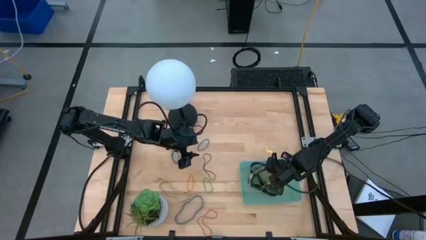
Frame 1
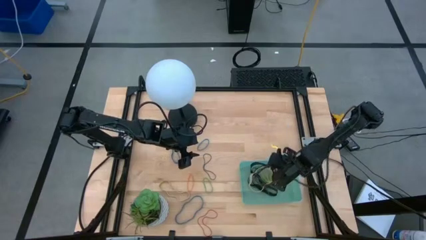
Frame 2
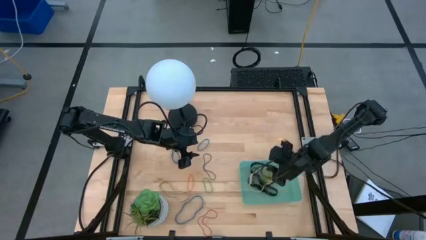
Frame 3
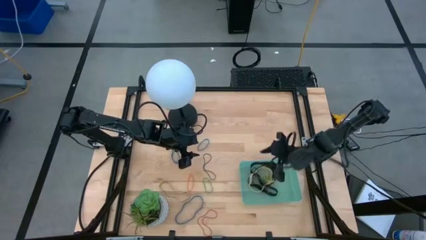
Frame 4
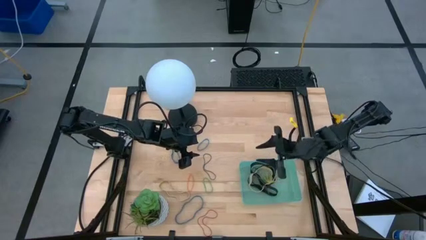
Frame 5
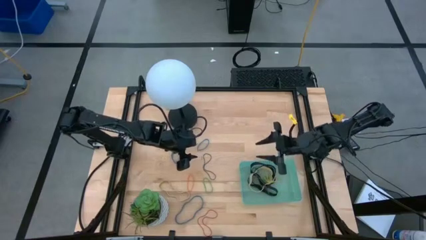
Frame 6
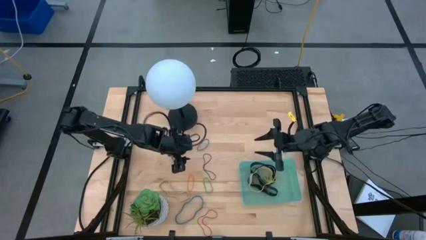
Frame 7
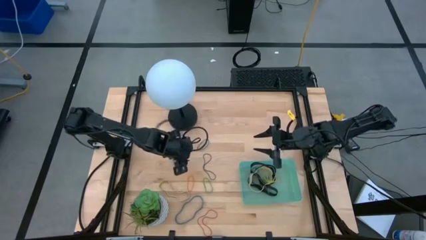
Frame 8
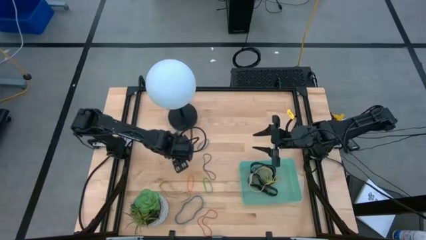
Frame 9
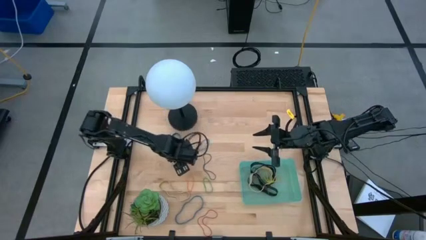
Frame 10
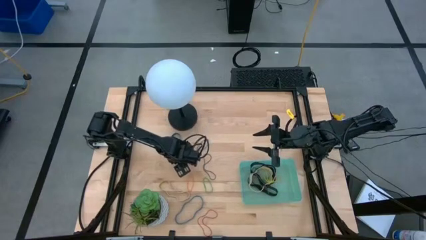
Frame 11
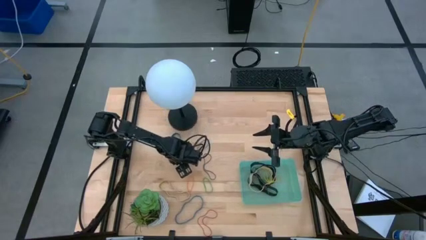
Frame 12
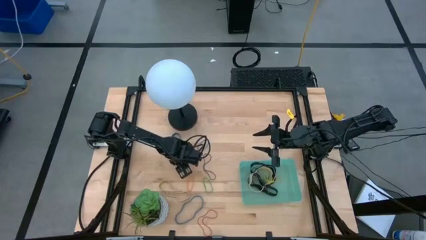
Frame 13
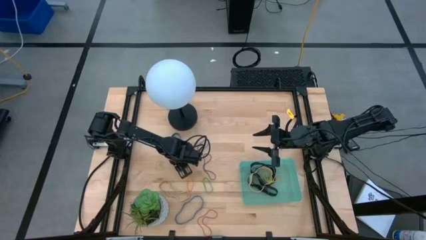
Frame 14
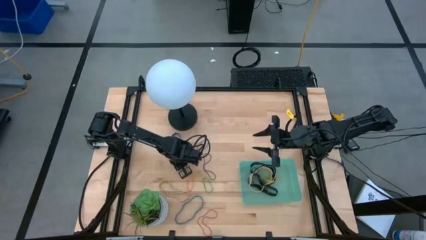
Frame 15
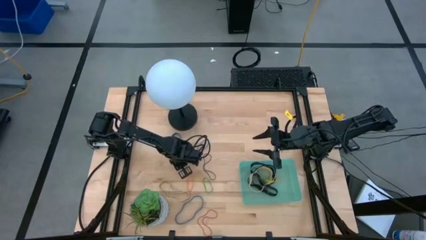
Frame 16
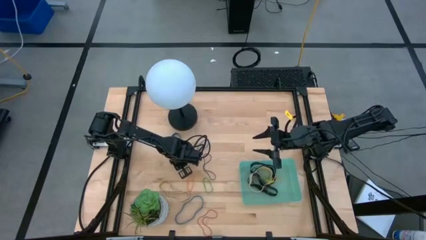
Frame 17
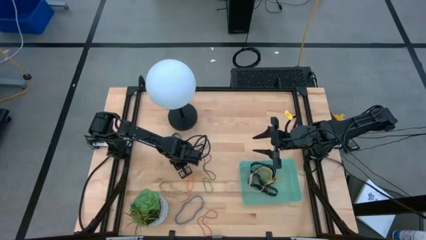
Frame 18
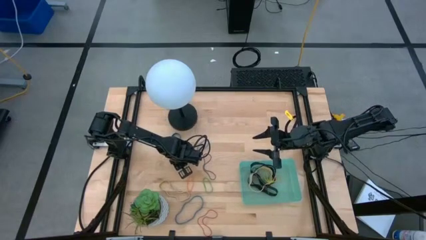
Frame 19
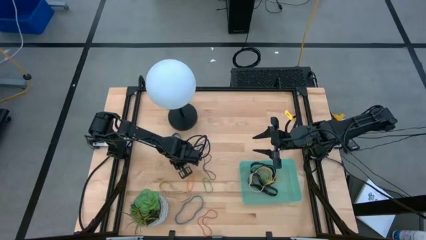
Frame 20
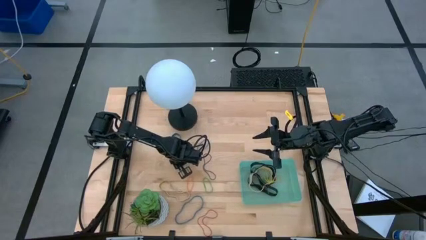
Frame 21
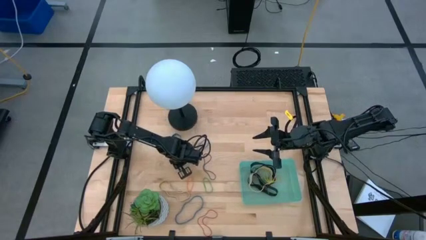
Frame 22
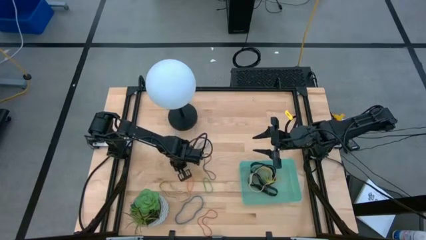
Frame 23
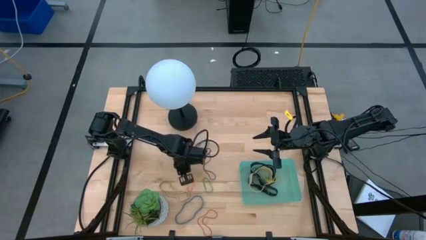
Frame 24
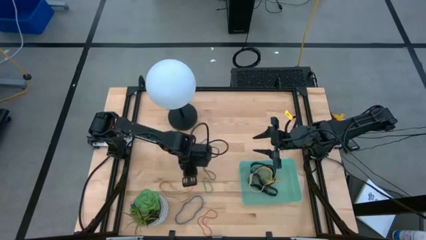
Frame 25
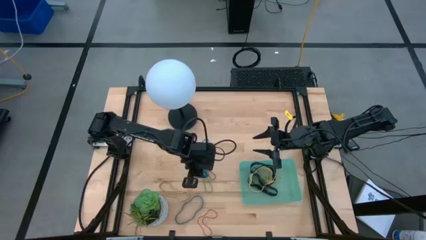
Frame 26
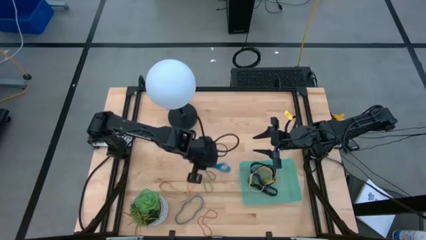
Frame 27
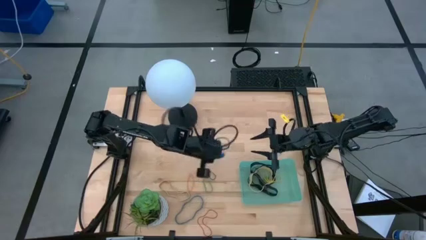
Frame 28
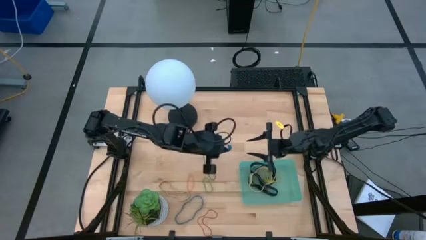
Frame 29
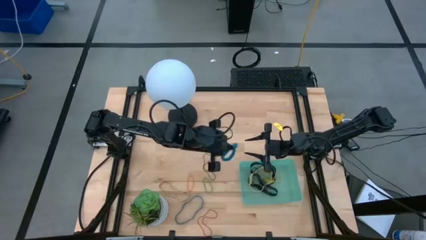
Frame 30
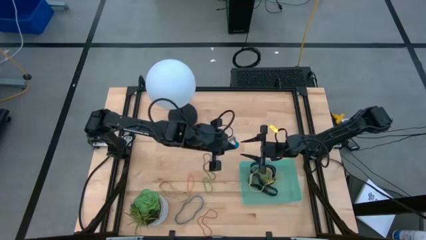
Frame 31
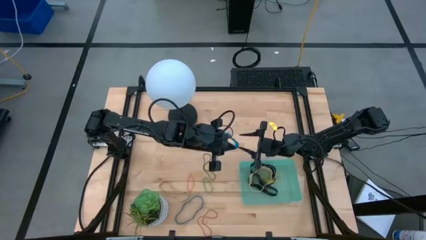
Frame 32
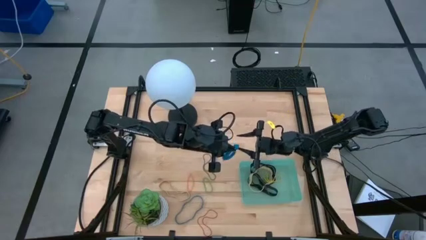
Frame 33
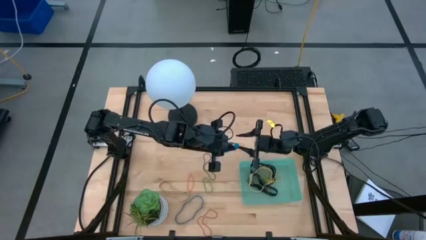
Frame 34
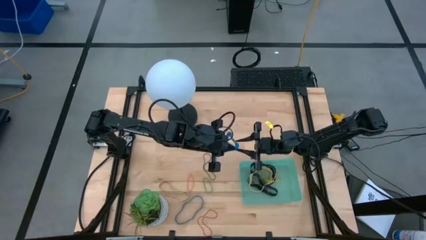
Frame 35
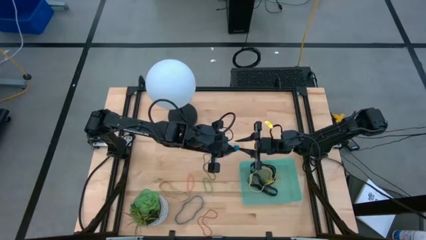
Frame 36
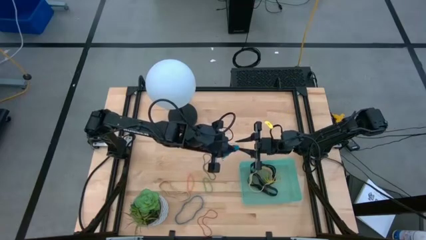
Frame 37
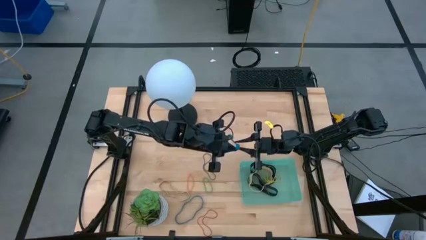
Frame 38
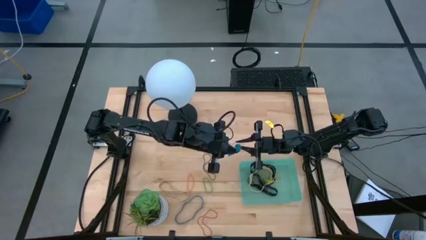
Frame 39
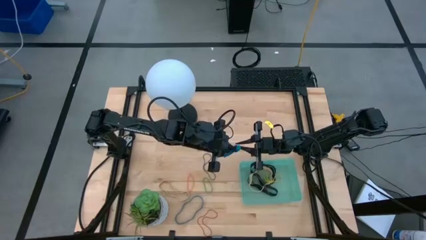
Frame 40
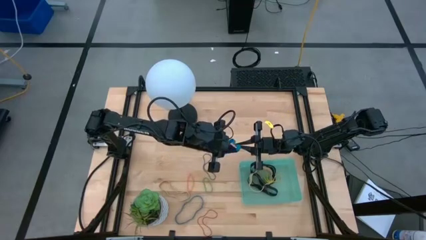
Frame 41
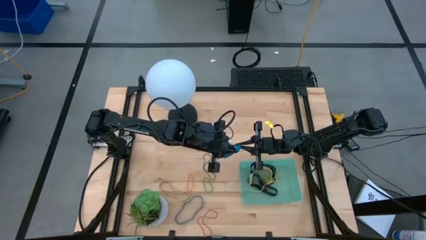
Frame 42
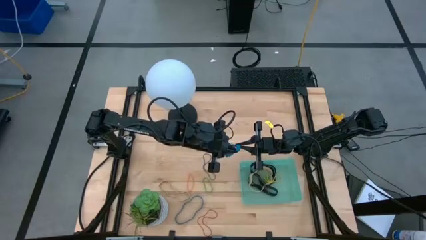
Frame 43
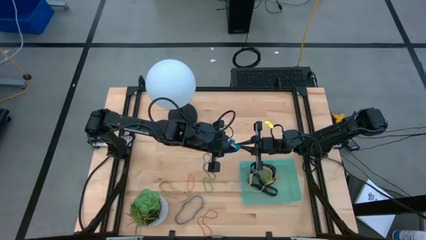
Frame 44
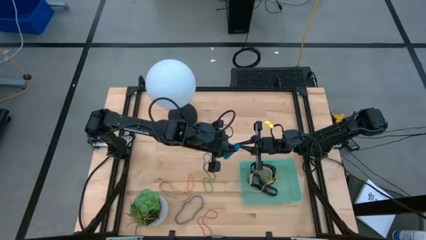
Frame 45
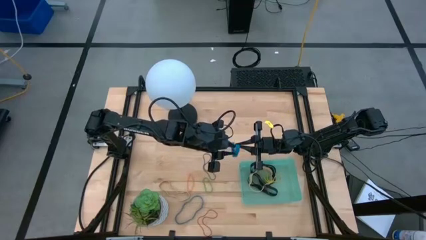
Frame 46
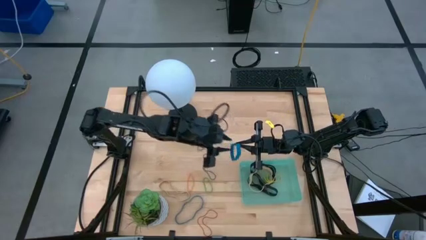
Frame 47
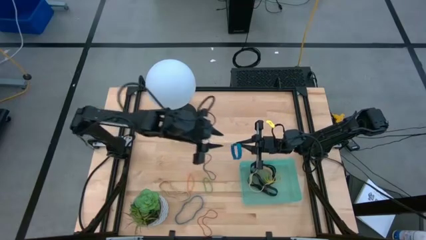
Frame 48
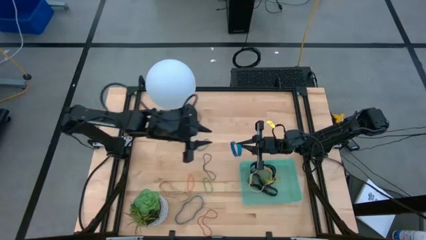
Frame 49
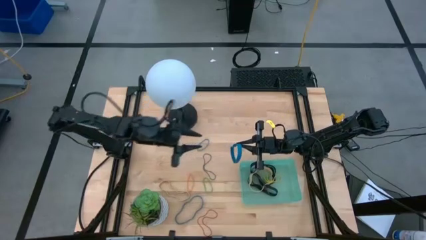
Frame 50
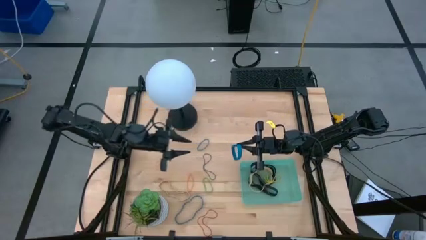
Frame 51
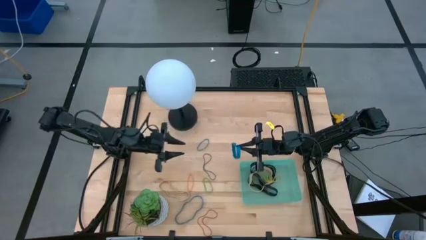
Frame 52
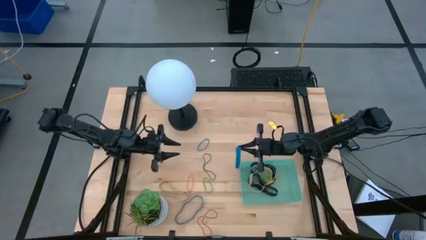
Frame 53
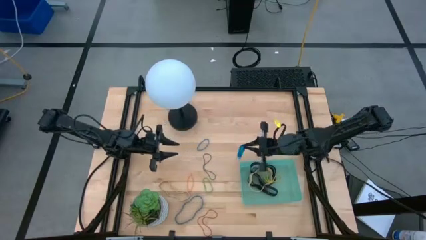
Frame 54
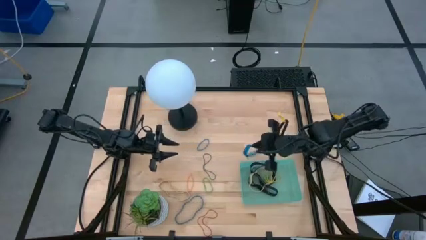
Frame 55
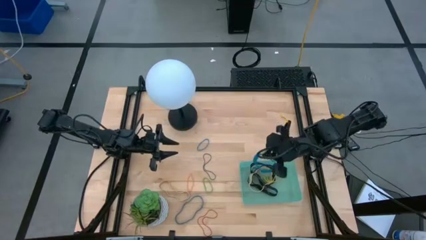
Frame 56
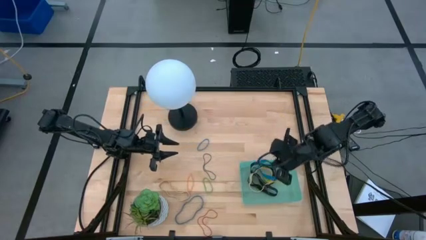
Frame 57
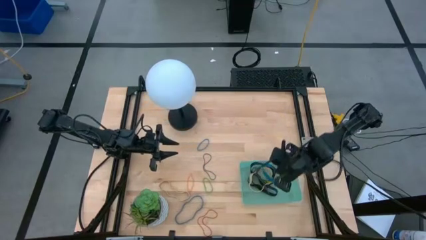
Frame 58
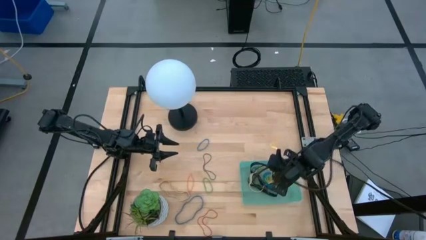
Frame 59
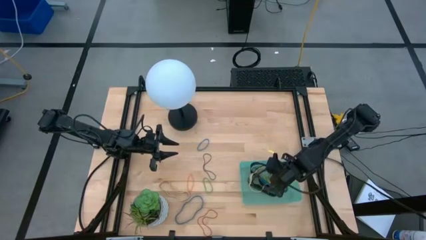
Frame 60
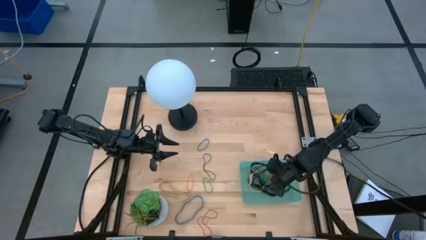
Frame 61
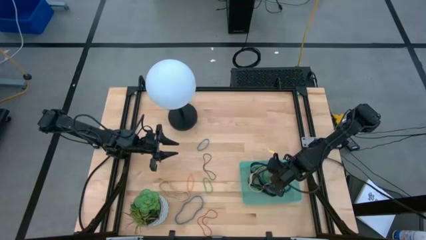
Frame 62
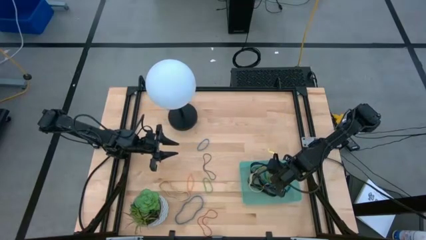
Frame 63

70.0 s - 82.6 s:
Task: Pick and place rubber bands into bin
Put the top left blue rubber band into the green bin
